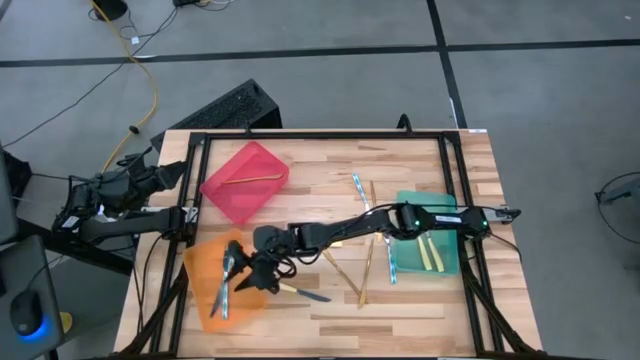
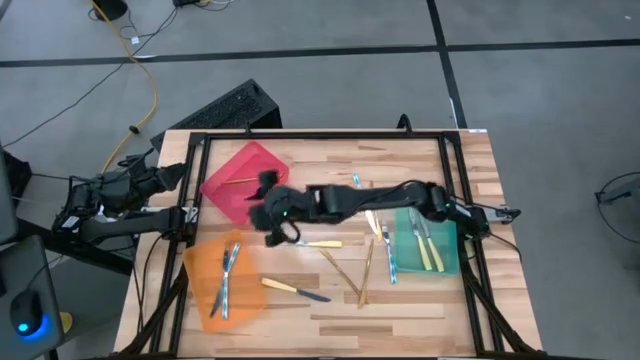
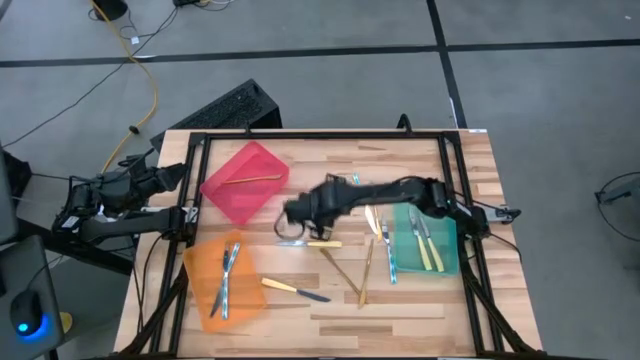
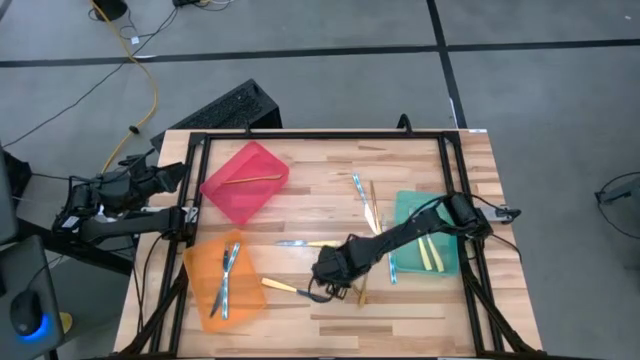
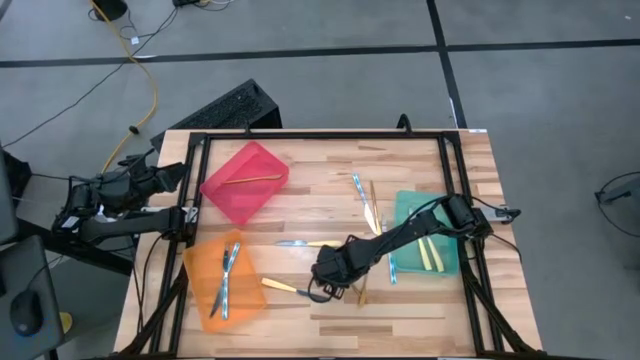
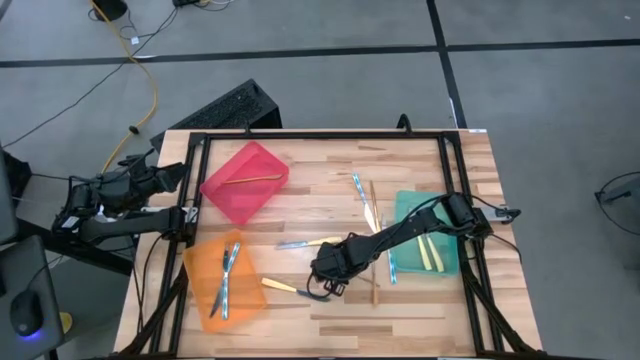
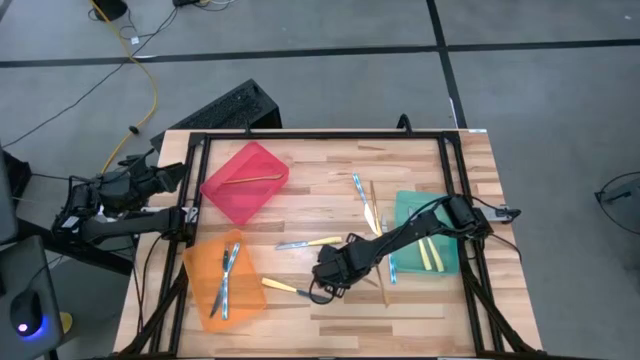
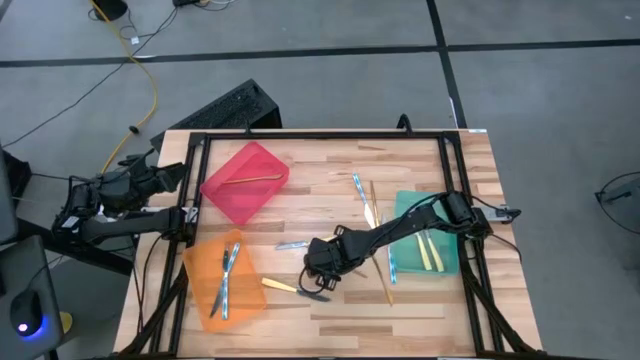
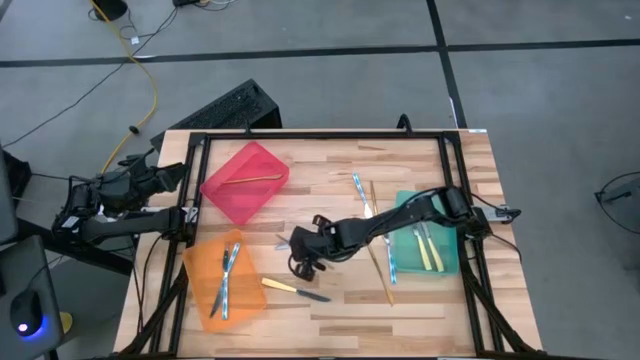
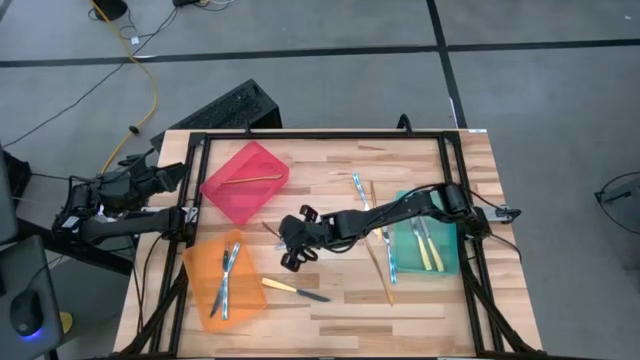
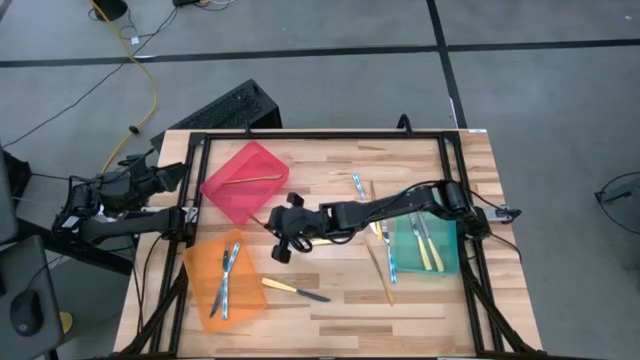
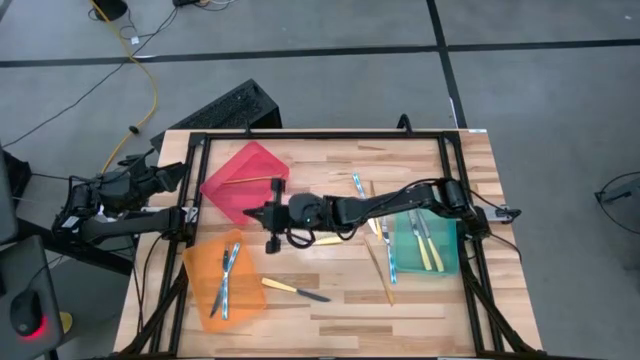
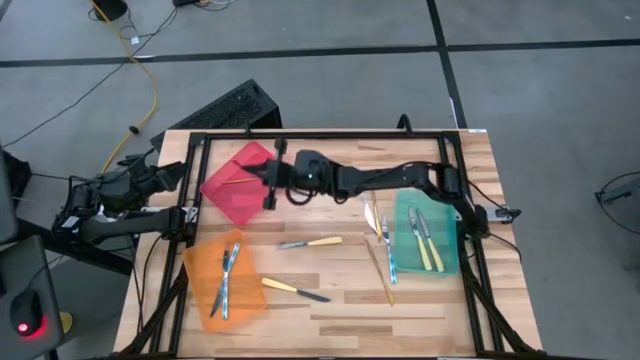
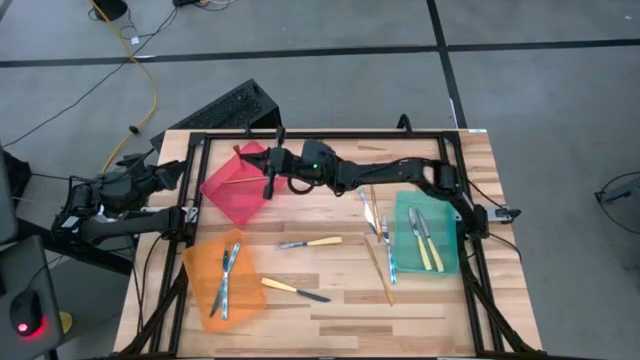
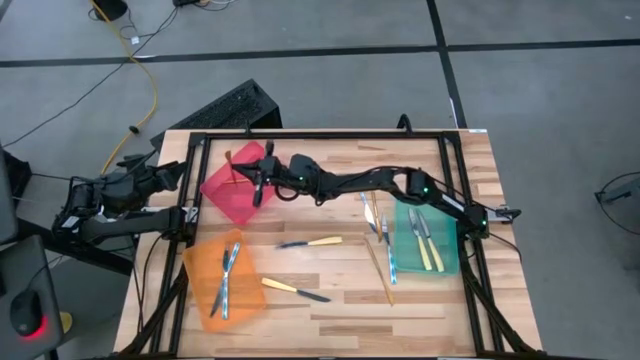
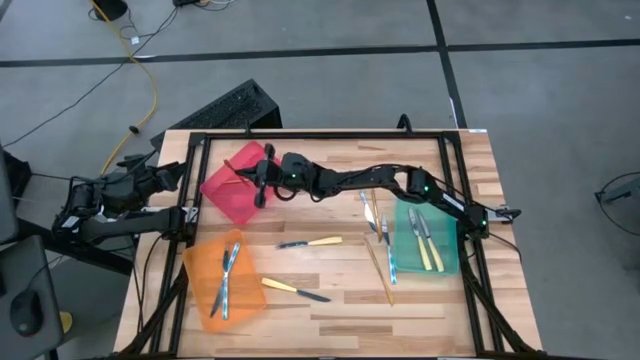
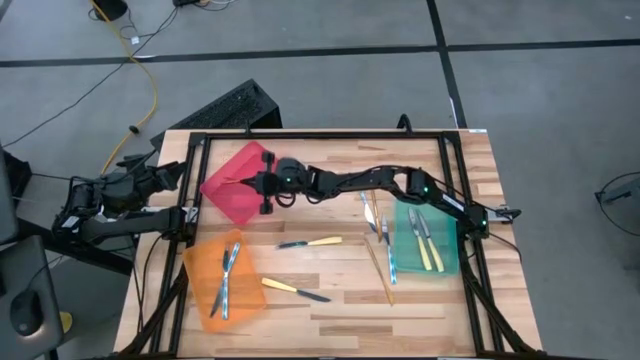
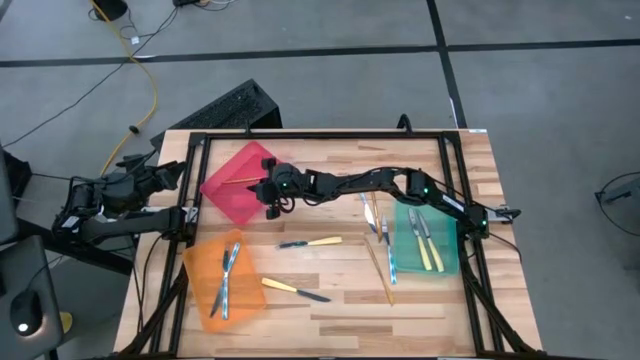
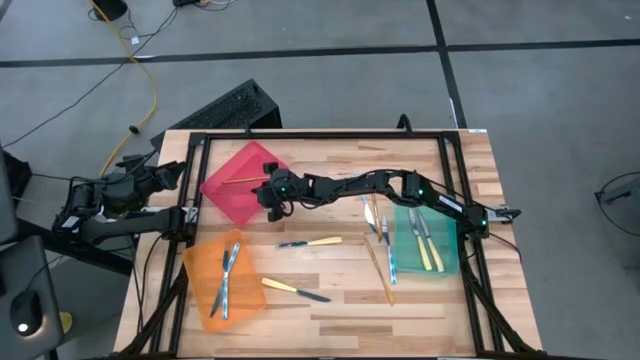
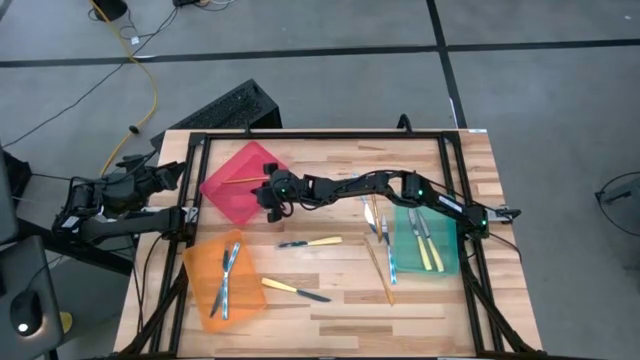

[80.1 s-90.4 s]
Task: Sort silverware by color (type)
Put the bottom left gold knife into the red bin

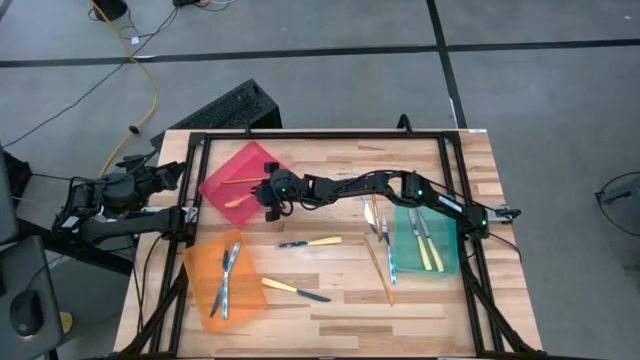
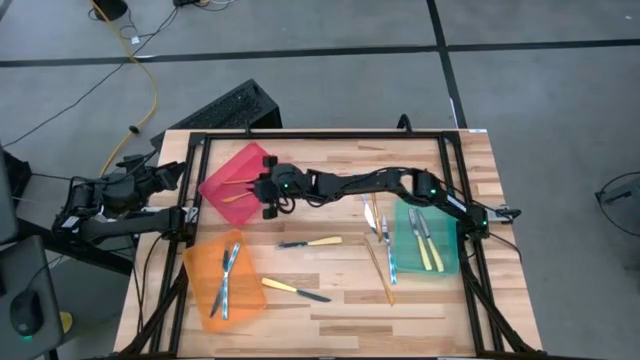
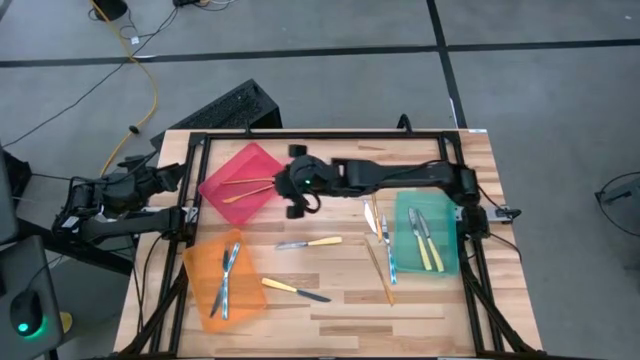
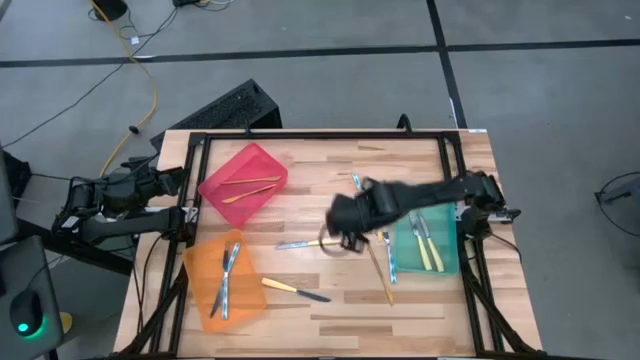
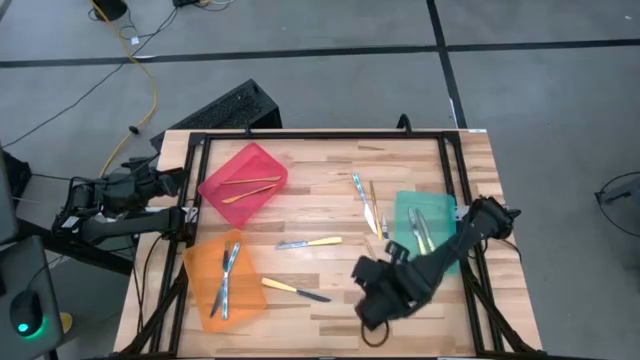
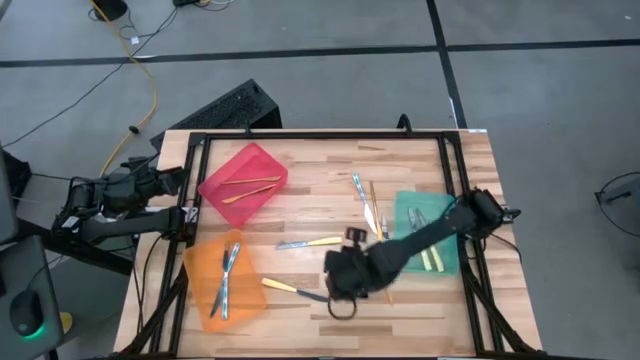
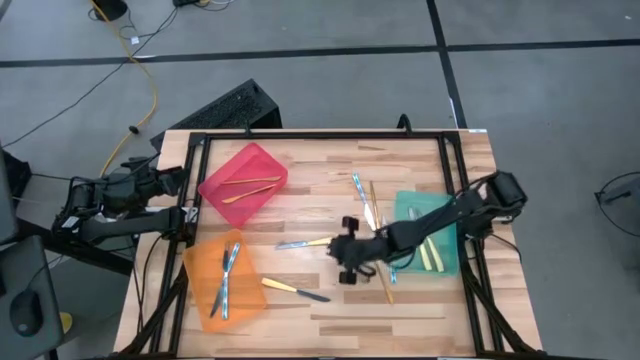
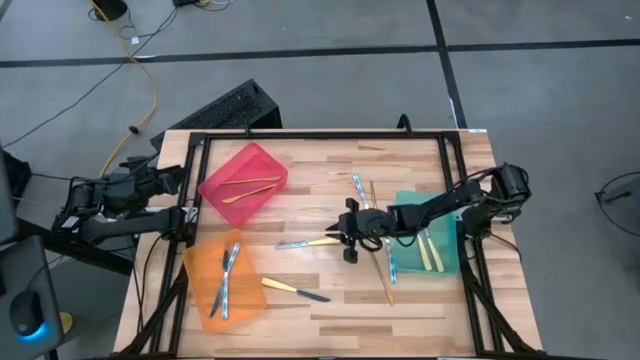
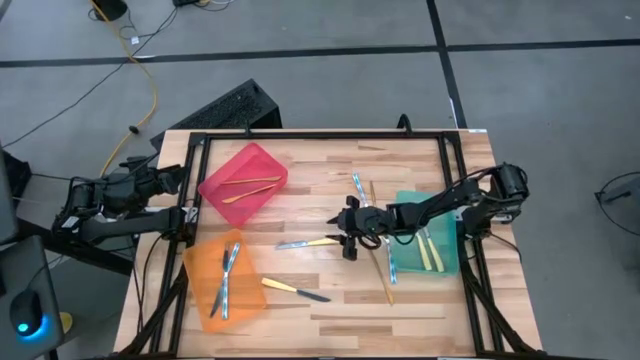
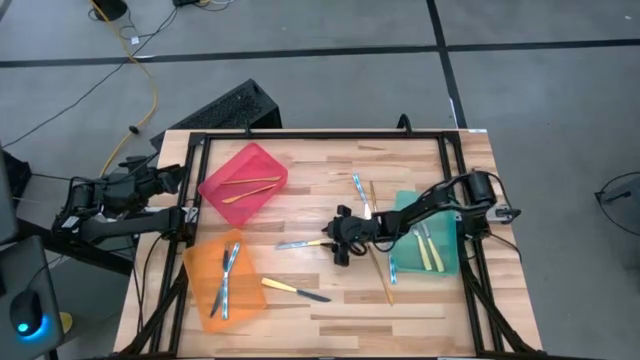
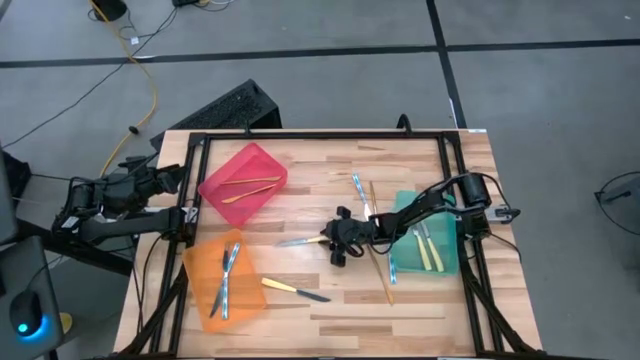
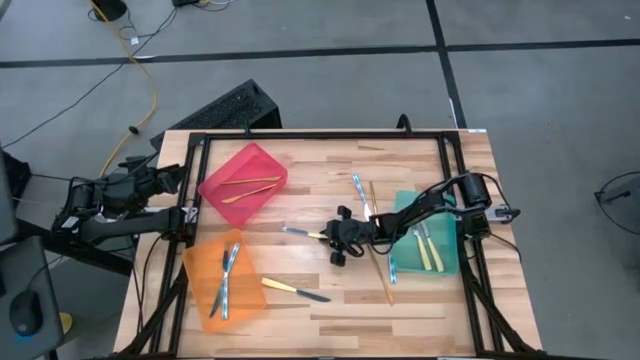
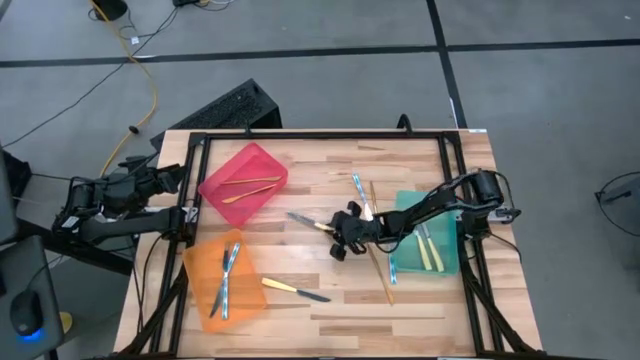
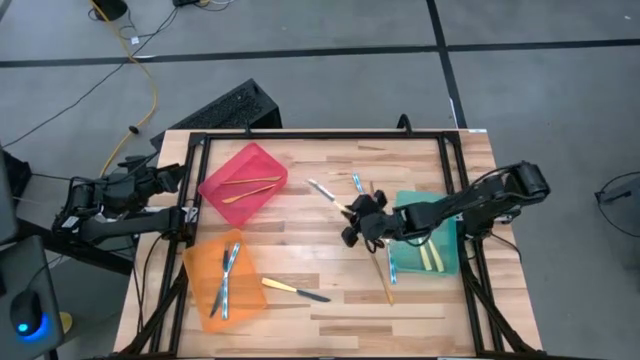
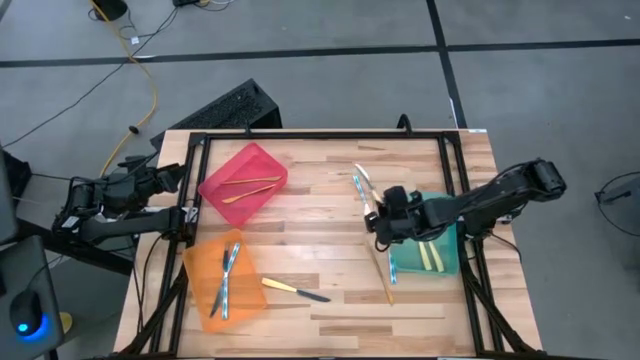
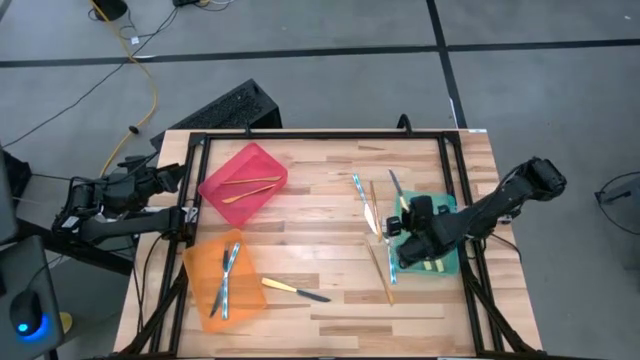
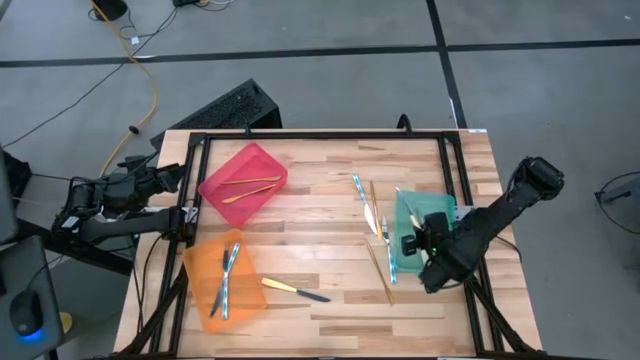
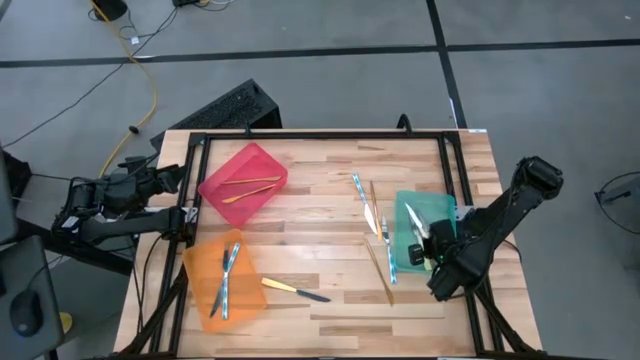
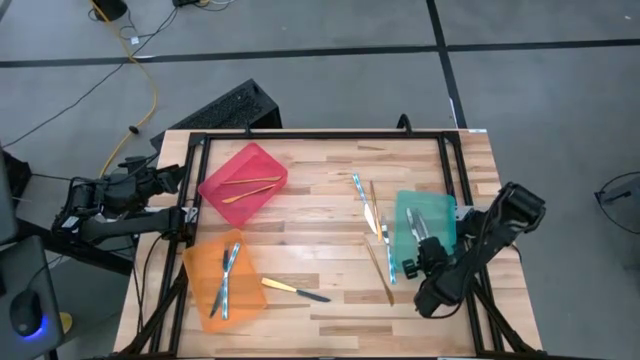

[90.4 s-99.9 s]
Put the top yellow knife into the green bin

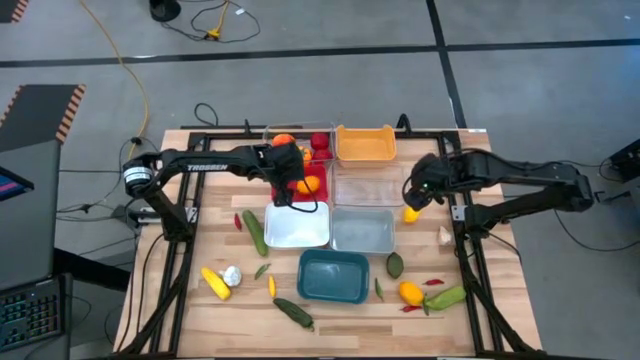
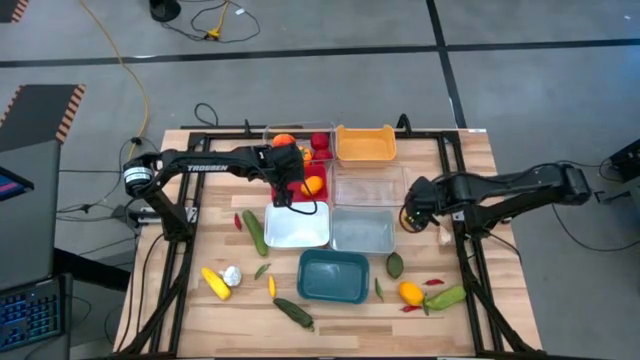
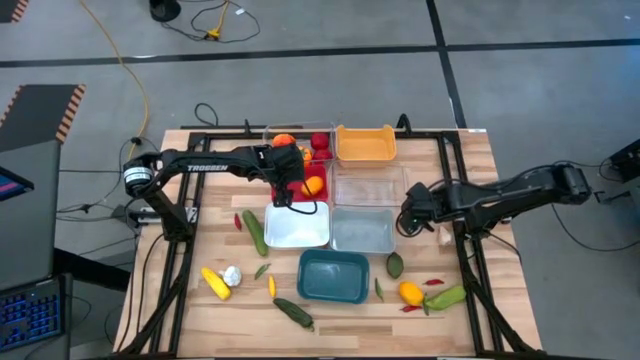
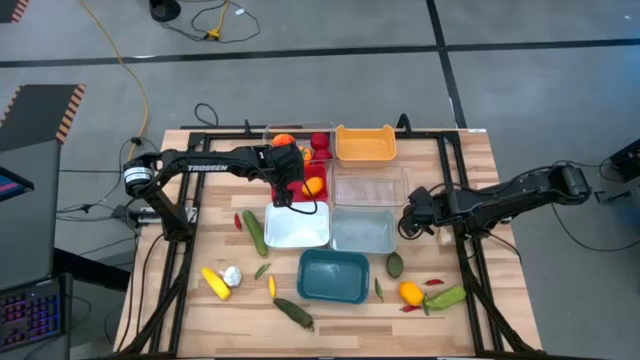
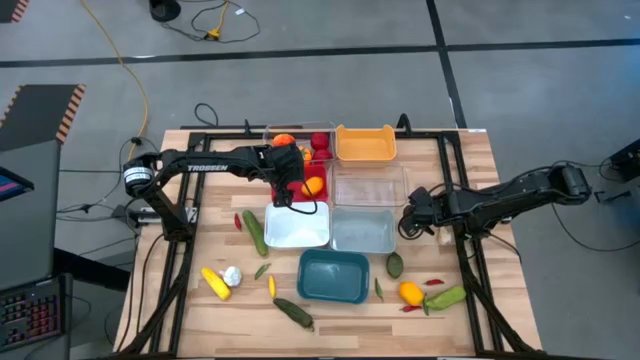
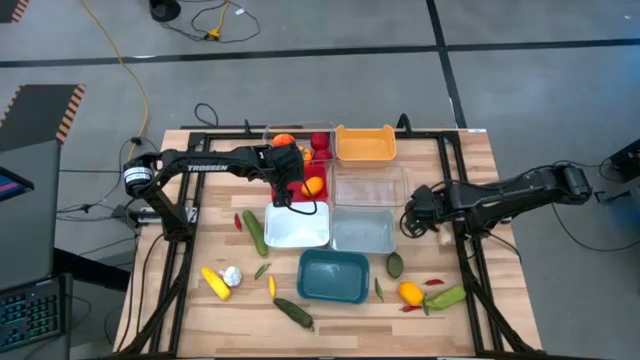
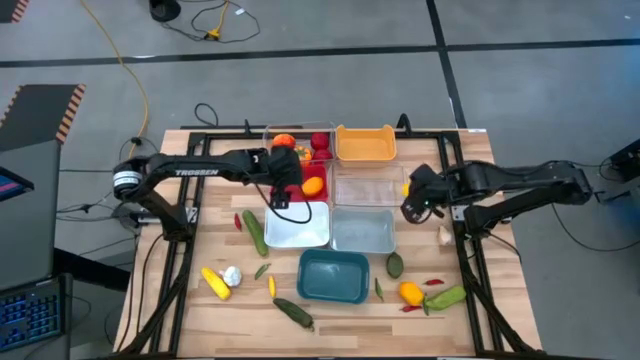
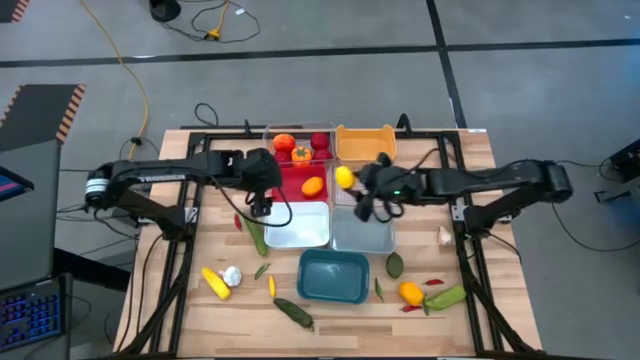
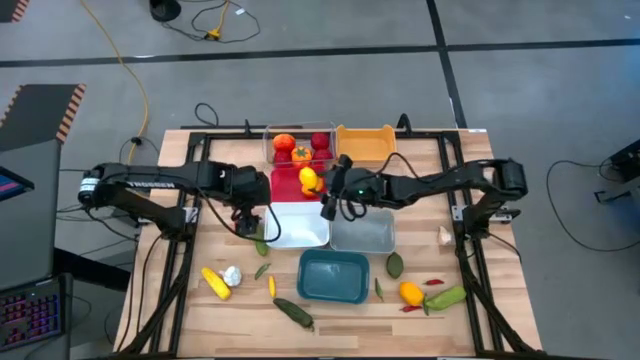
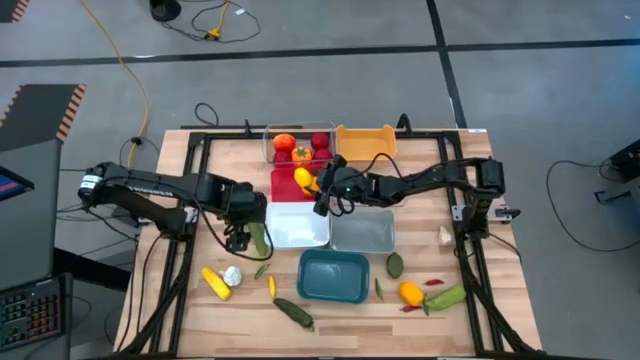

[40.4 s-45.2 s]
Task: Sort produce into baskets
Put the top yellow lemon into the red bin
